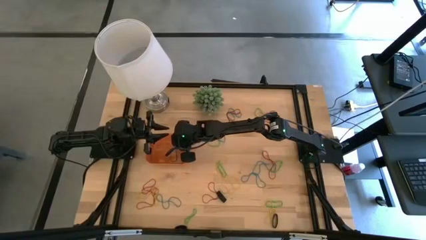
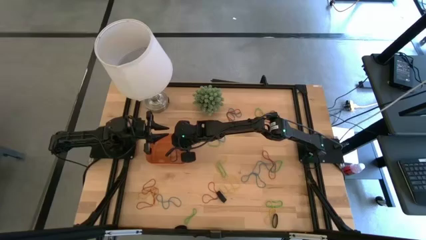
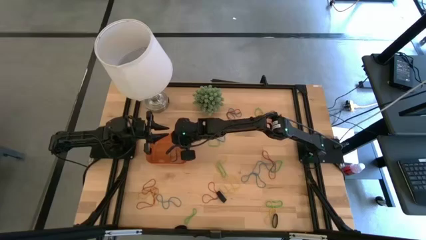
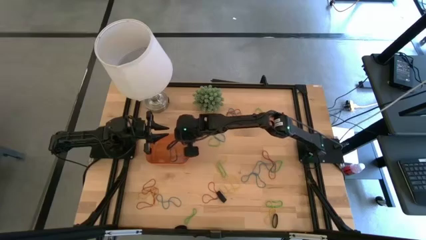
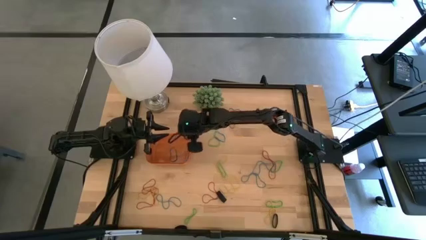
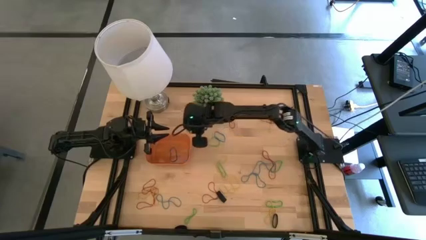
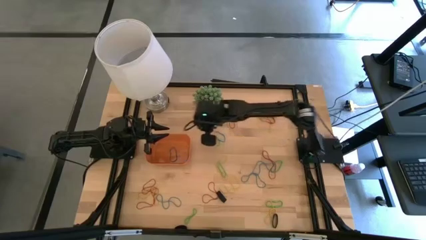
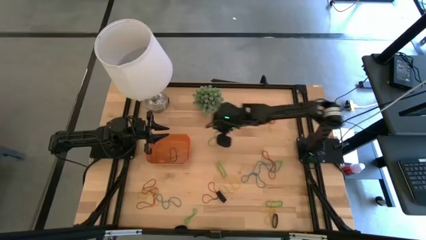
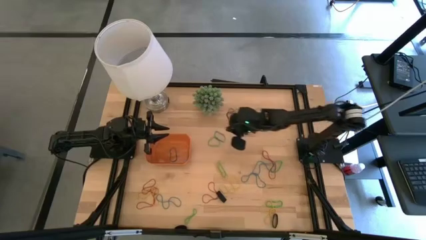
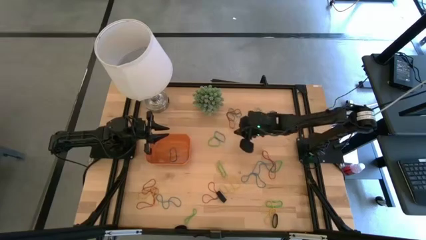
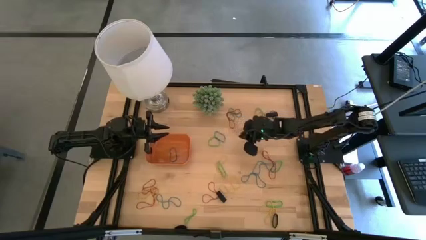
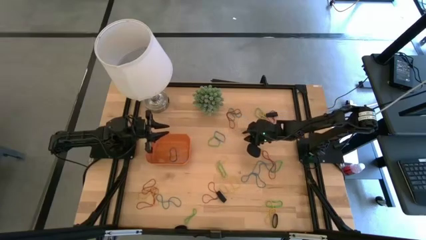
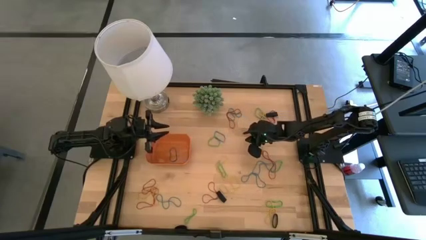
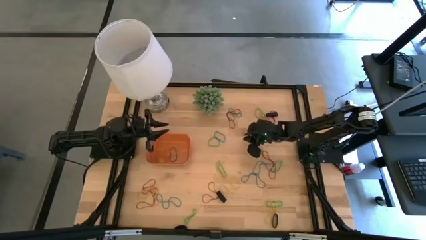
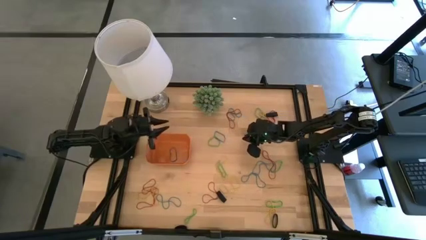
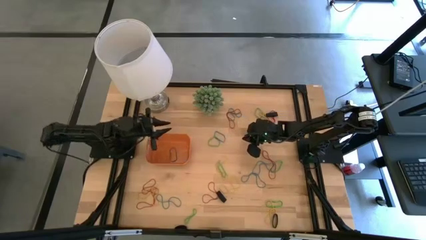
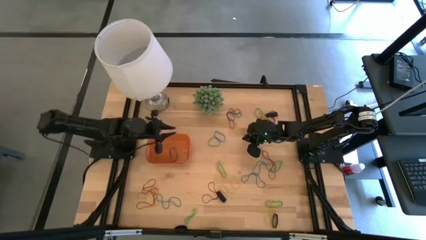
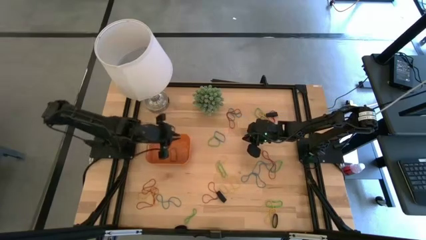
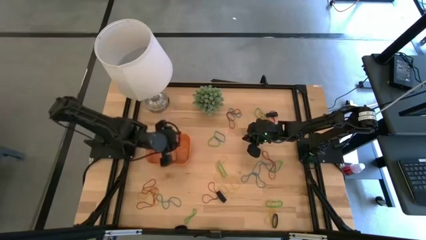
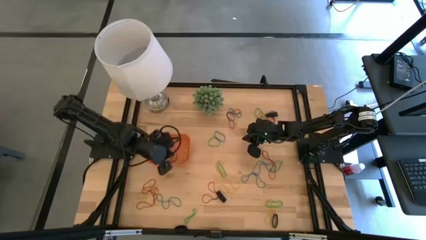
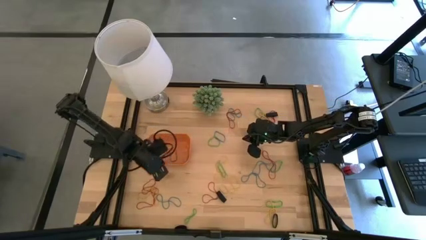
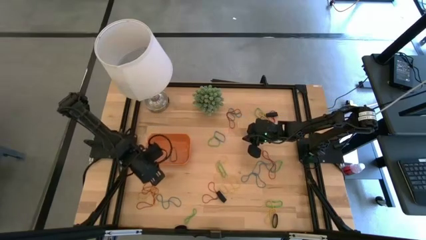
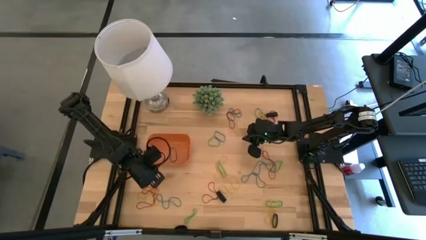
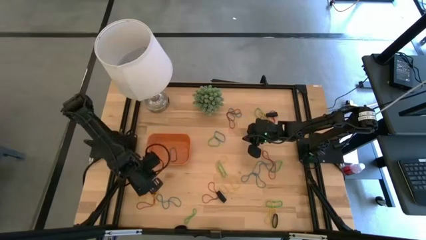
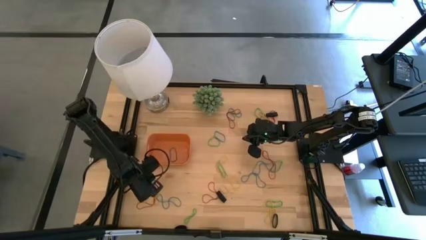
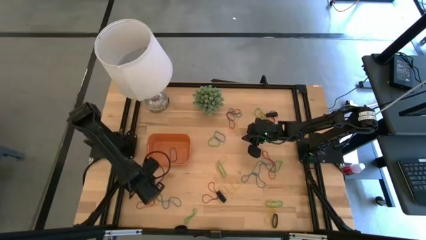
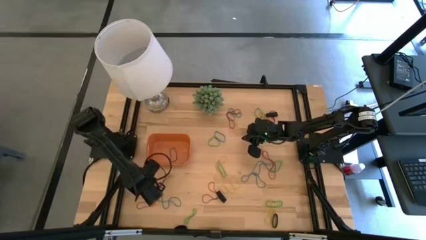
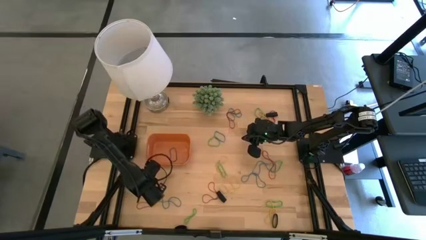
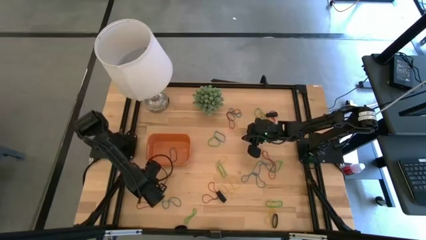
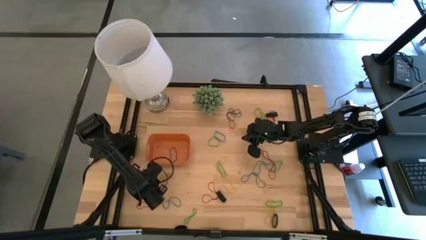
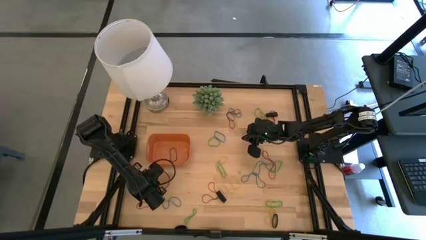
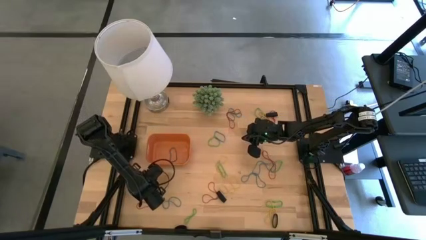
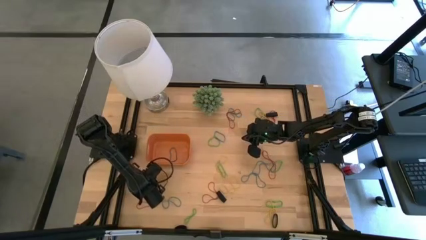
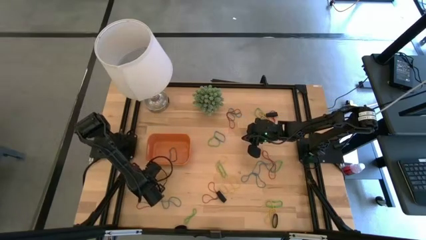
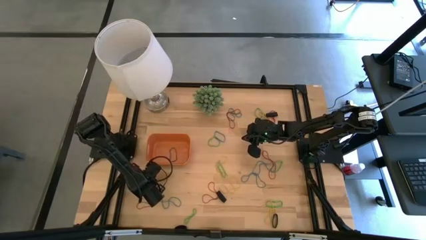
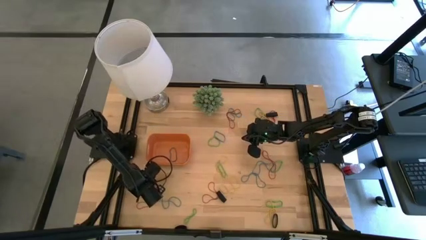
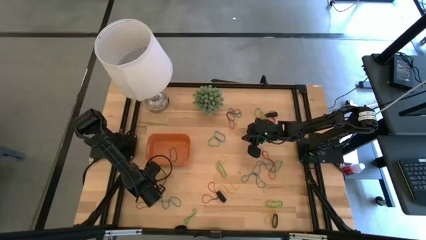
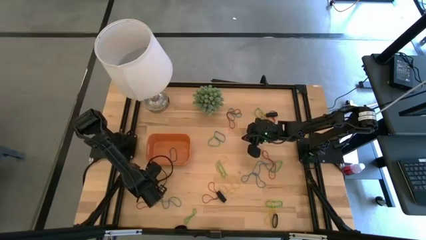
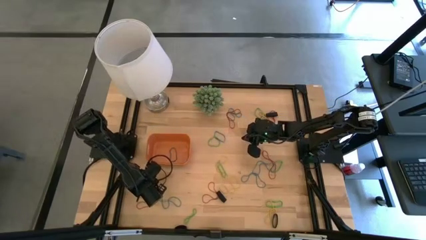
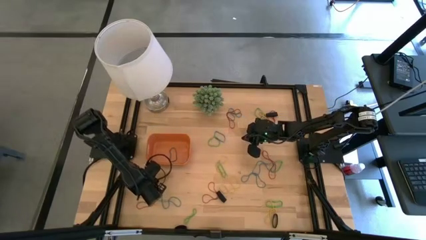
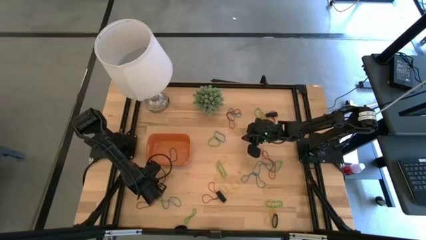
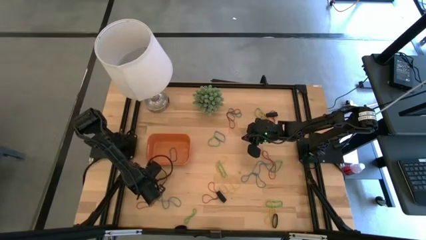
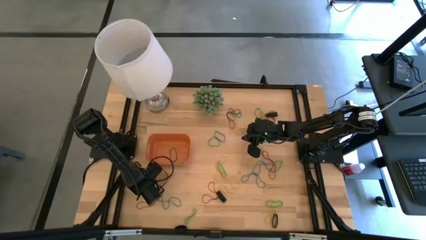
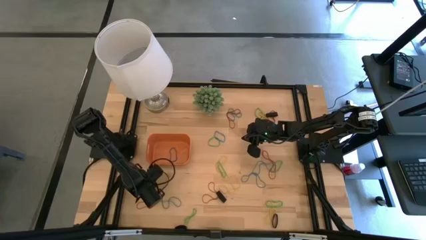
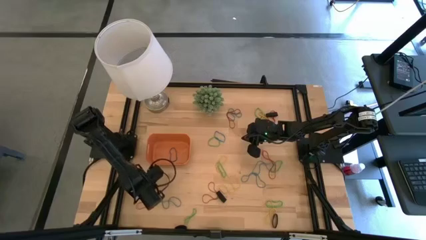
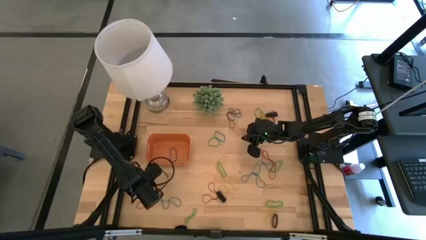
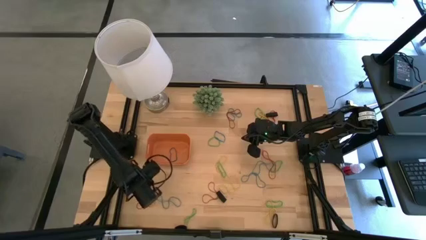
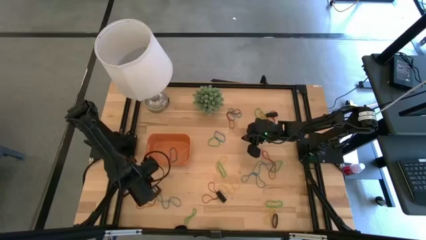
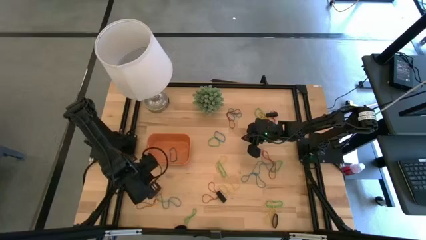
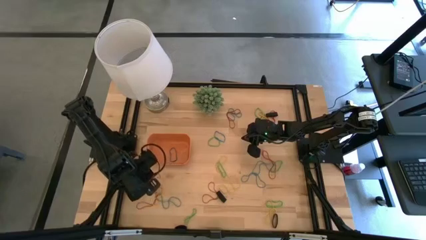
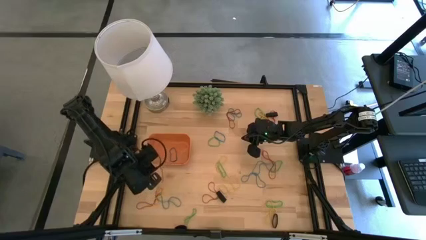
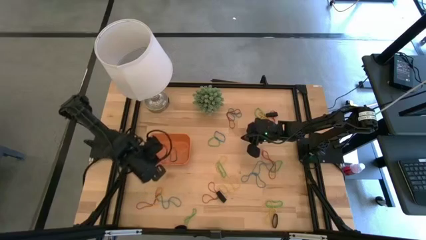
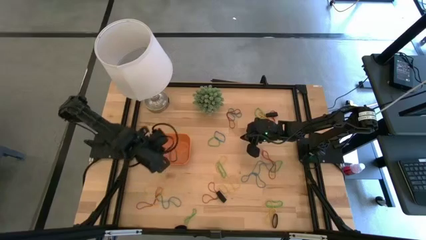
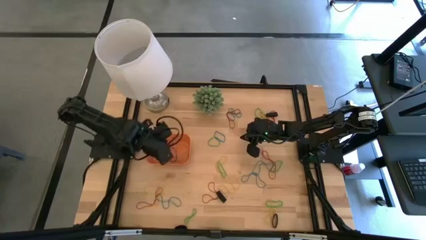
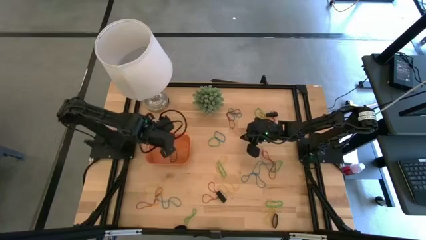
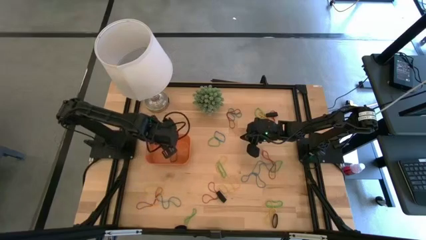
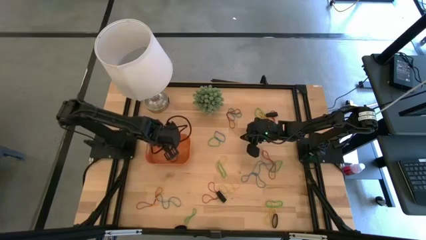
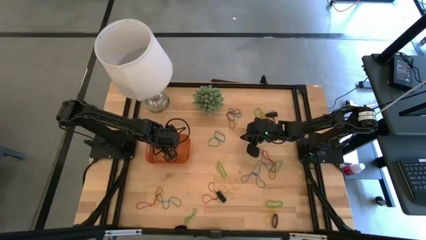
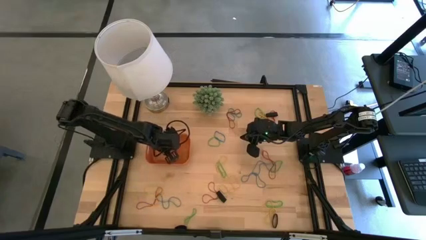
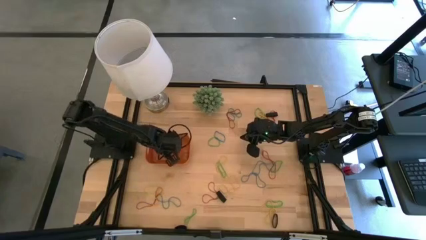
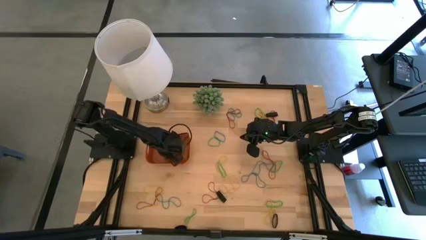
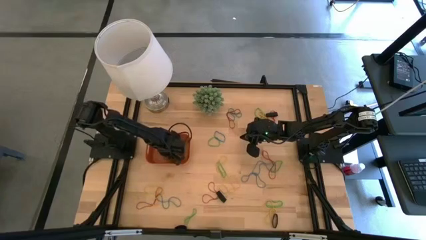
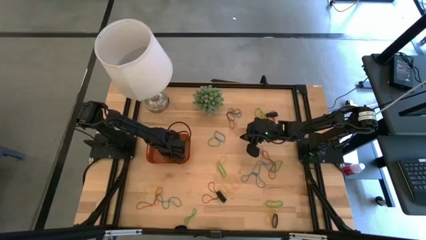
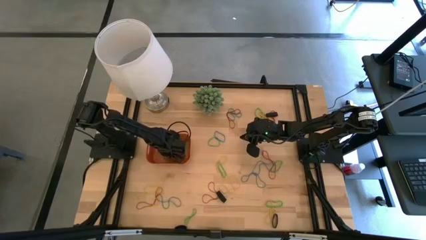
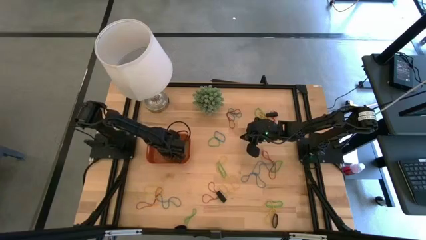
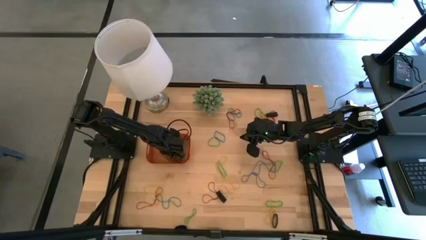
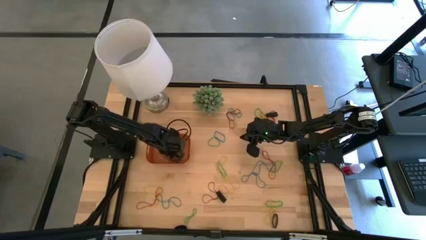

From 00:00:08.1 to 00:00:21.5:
Task: Pick and place rubber bands into bin
Put the red rubber band into the orange bin

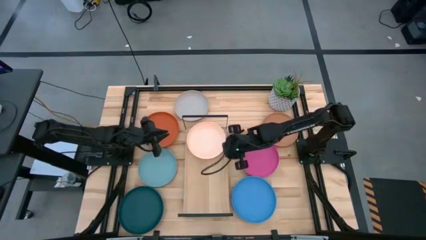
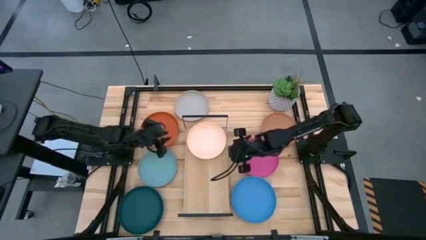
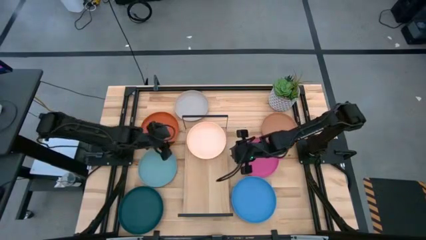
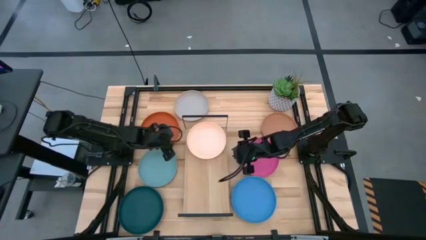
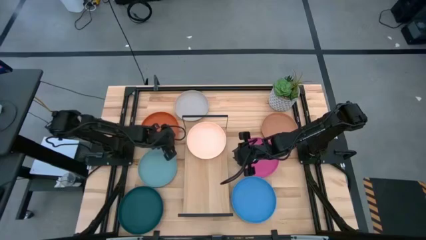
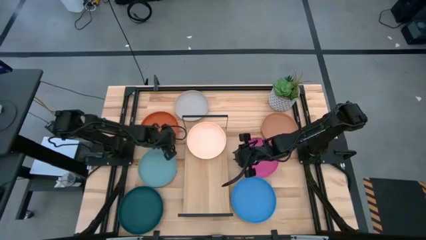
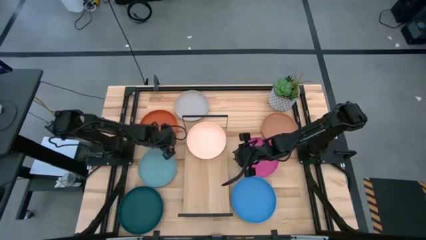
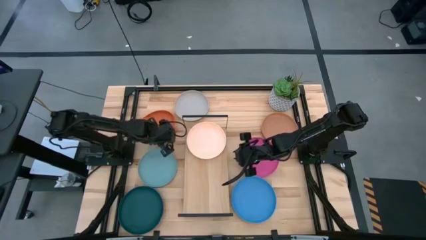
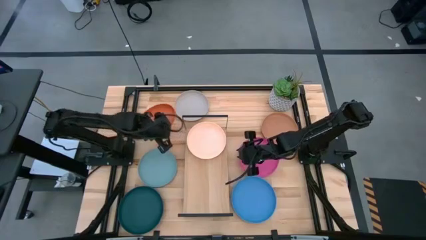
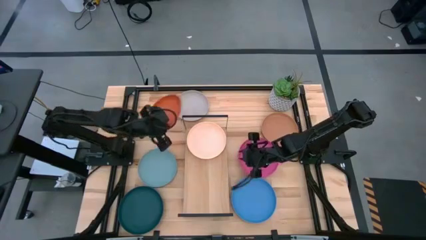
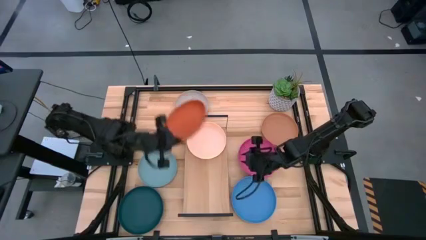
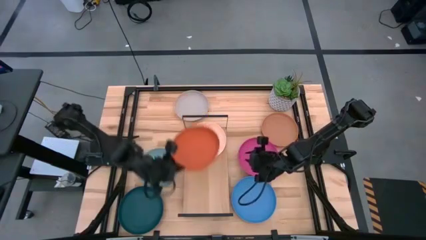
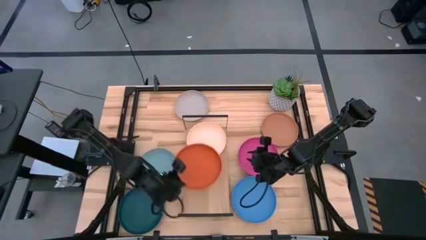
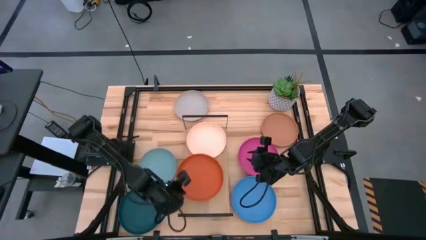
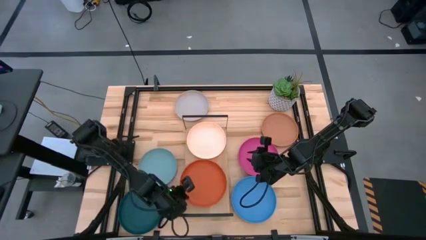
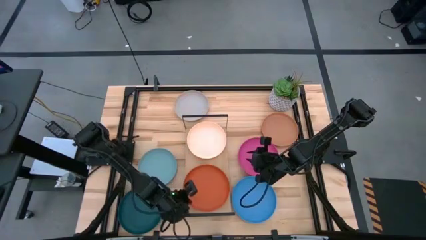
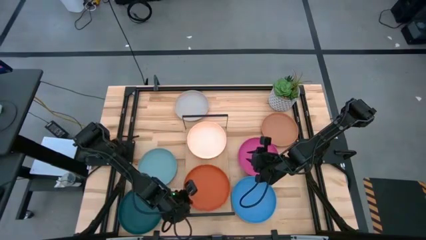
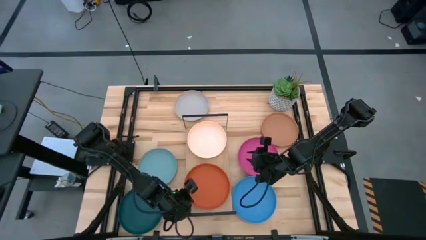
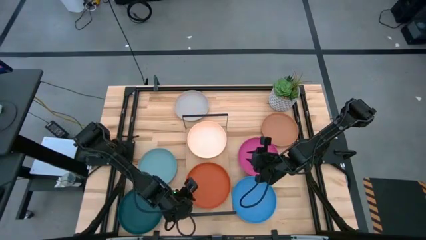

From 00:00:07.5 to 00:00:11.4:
Task: Place and stack plates onto a shelf
Put the orange plate on the shelf
